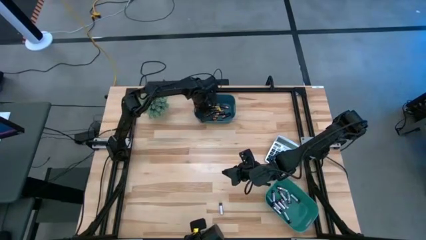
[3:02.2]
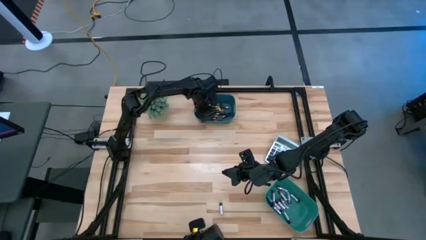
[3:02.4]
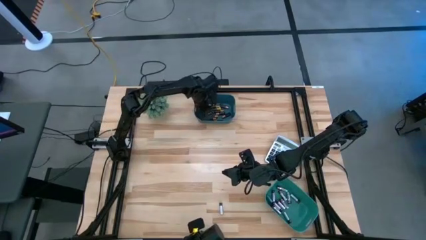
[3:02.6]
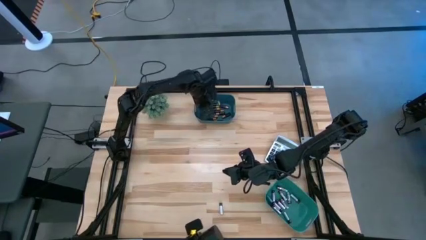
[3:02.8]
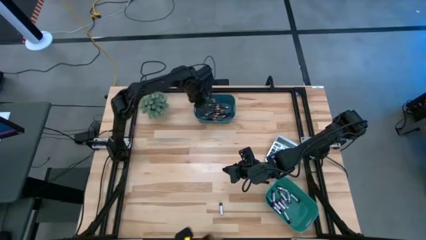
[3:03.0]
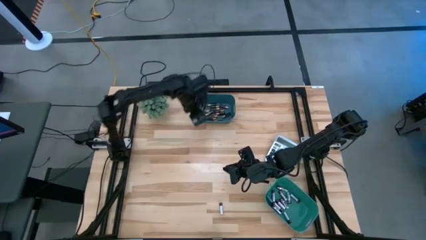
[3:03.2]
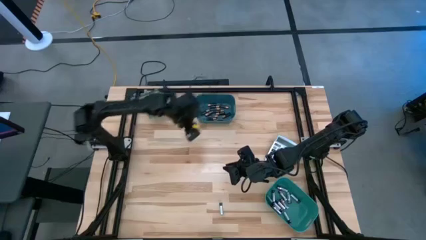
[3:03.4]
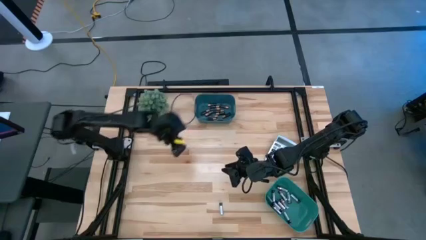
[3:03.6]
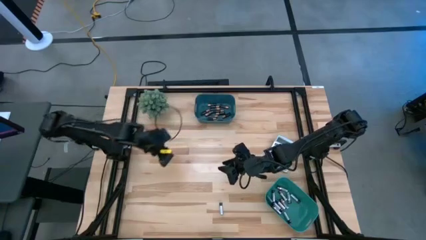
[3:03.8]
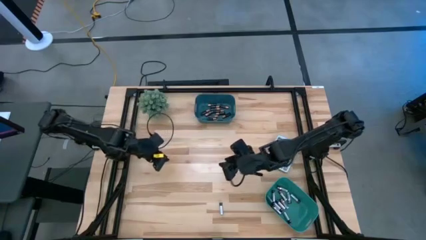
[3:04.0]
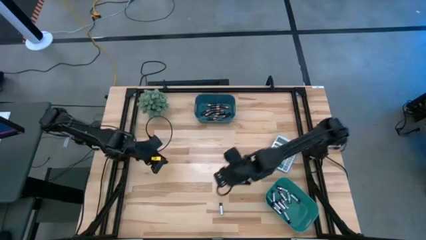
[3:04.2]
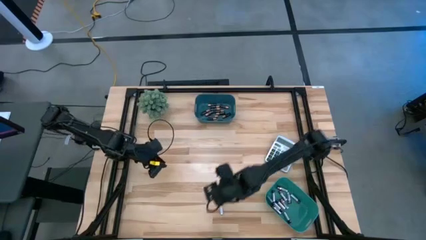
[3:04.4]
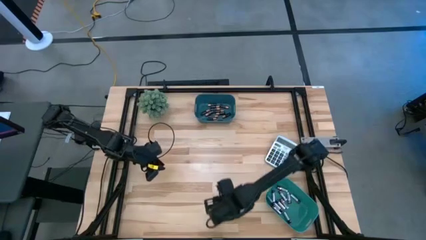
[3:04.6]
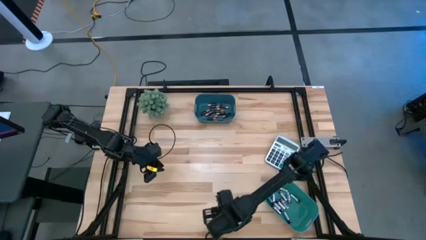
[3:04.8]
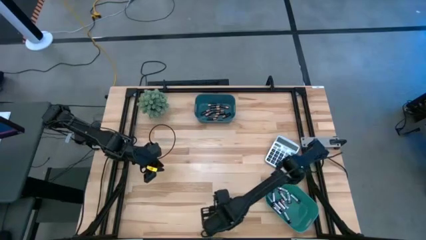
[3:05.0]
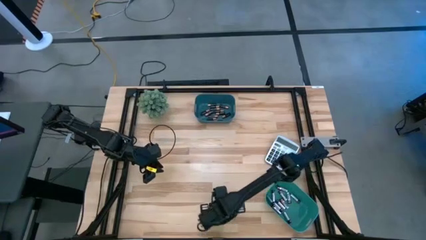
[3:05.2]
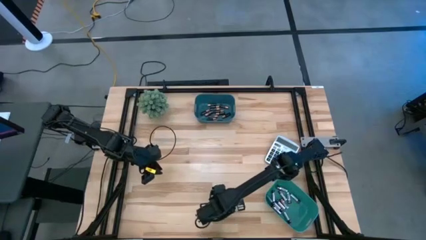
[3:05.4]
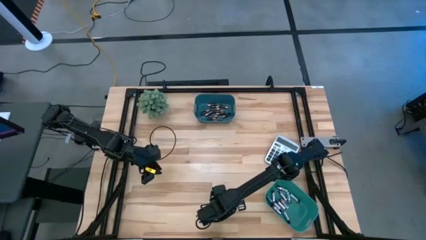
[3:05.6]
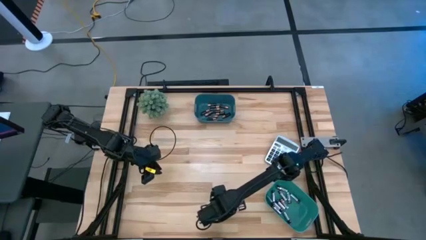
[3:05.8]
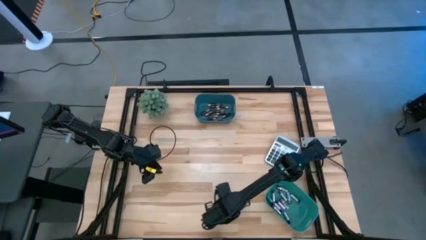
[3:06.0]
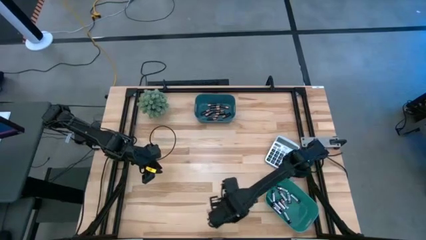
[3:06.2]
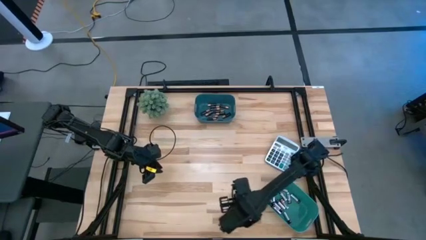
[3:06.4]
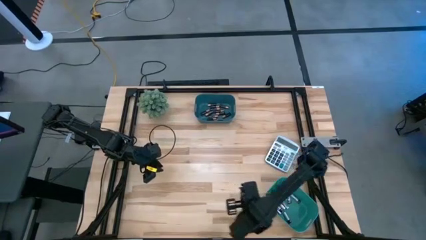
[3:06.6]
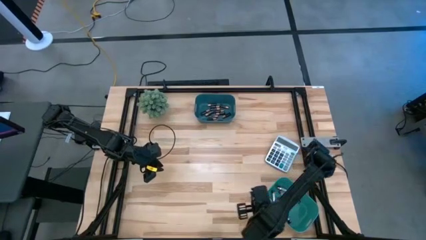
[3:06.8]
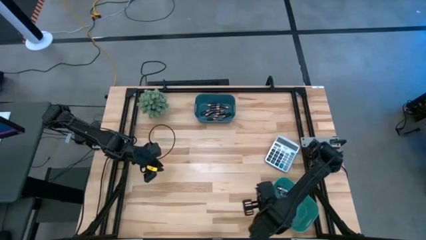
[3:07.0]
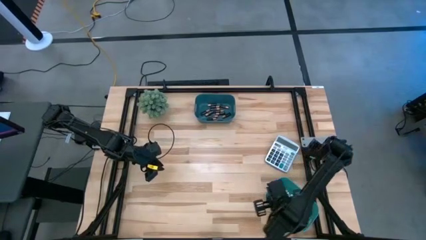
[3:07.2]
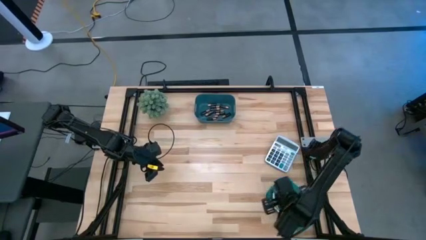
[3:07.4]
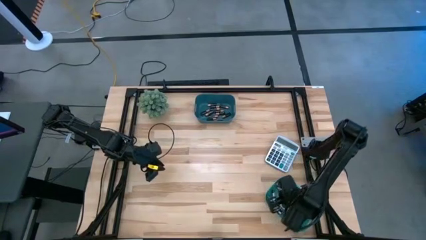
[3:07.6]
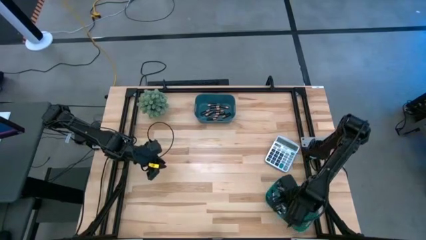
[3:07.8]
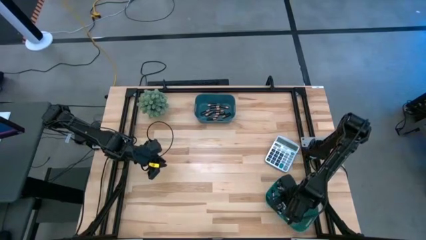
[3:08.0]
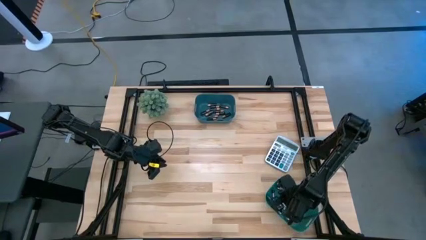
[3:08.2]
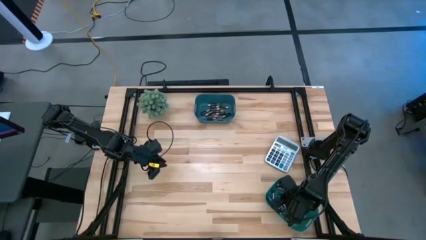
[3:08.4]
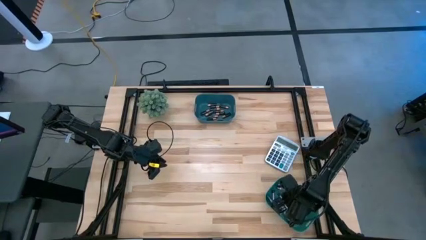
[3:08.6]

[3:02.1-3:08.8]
Task: Sort batteries
Put the silver battery into the green bin

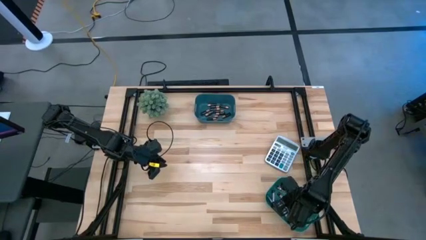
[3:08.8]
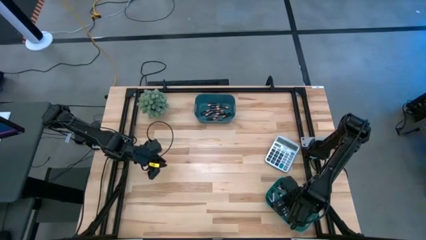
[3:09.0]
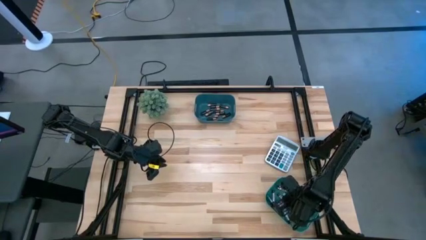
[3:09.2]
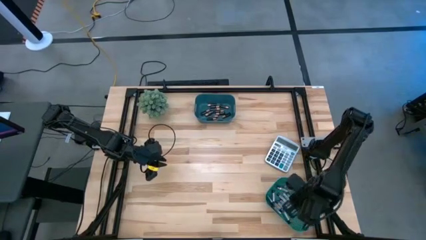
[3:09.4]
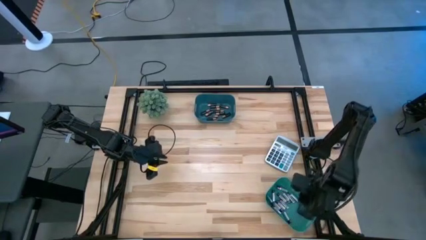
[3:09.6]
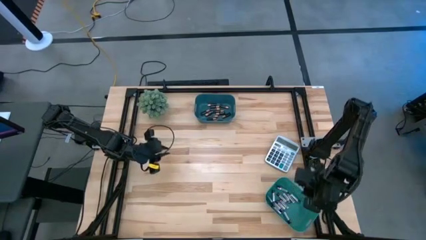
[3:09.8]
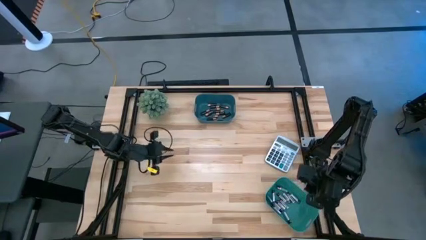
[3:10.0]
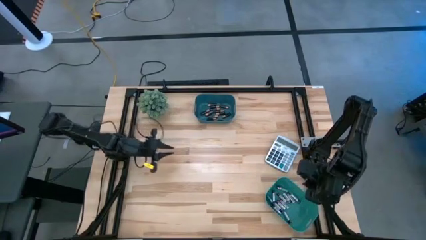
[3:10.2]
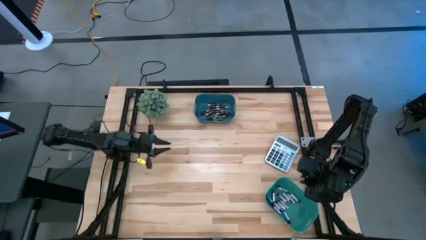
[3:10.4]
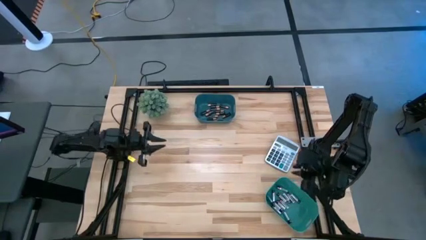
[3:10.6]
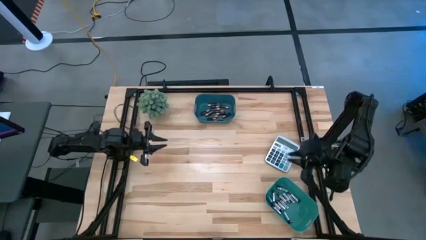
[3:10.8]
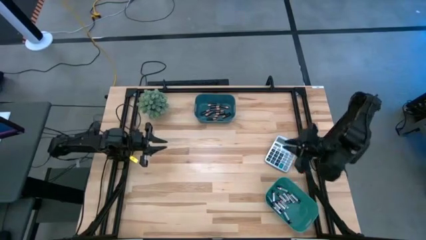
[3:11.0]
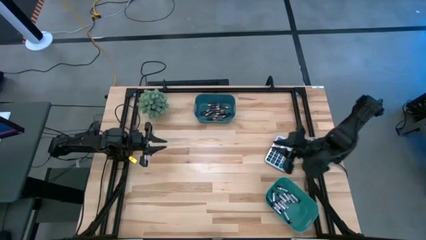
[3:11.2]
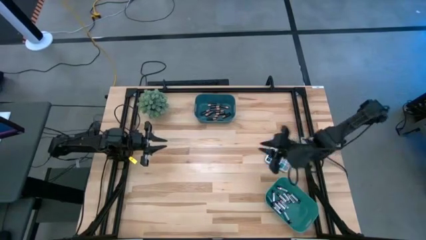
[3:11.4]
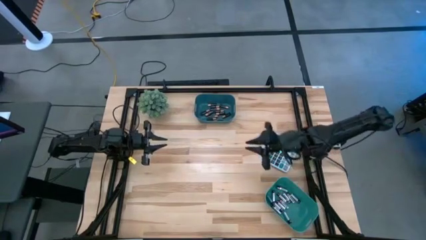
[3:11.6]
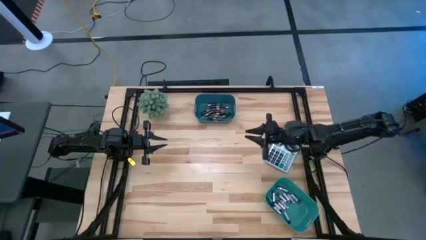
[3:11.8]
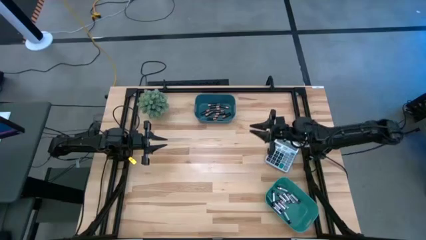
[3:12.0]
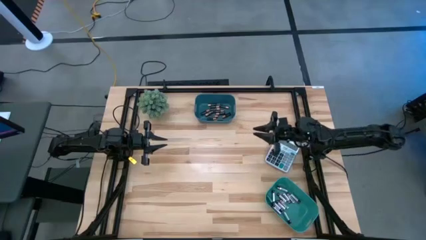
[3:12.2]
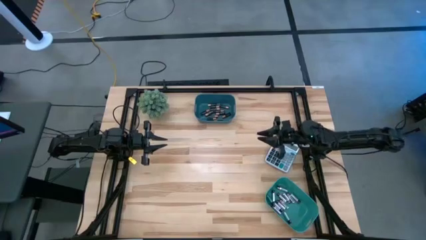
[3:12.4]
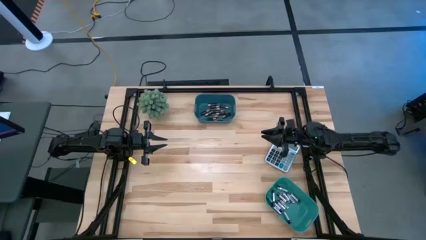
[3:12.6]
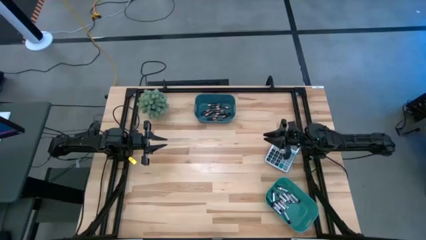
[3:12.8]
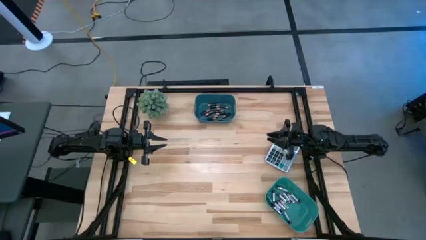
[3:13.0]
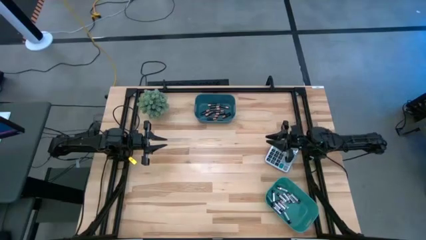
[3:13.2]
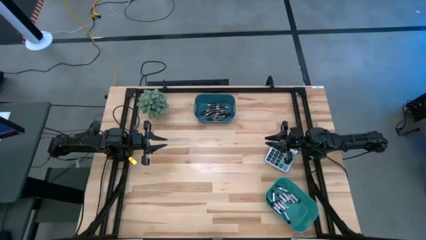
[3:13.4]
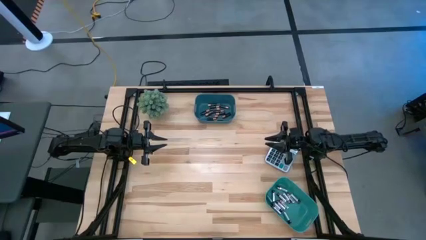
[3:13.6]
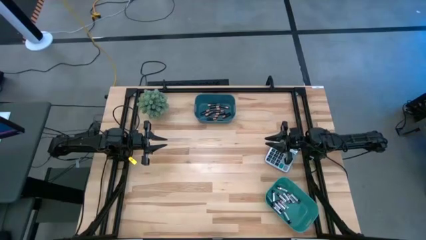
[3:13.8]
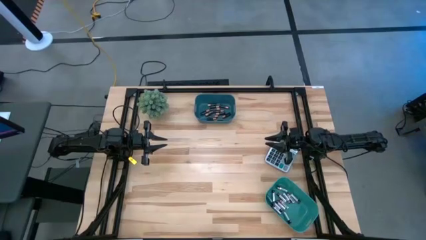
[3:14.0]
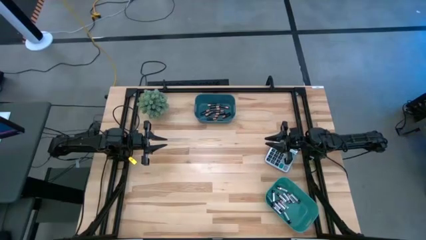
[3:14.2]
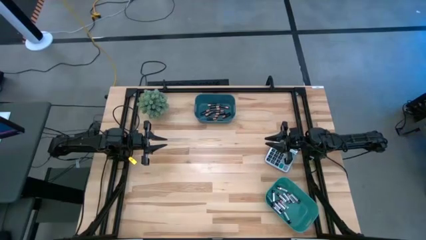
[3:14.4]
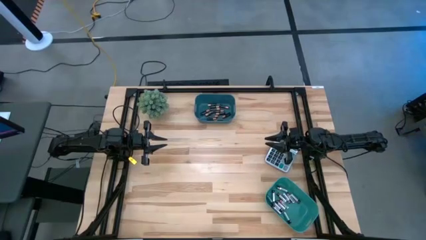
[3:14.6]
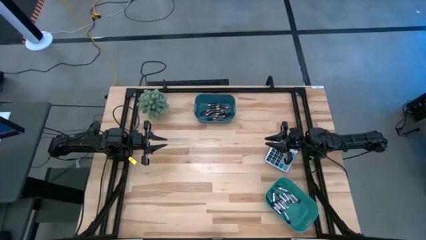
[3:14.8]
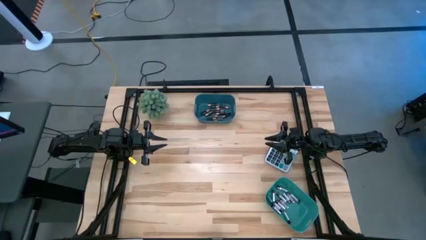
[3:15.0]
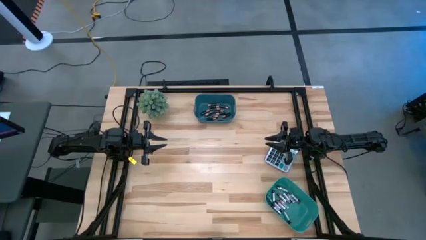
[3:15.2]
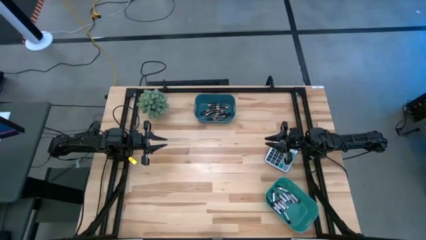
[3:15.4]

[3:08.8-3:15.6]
Return to Home Position

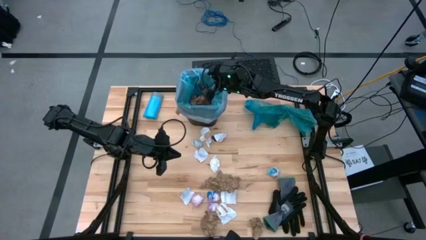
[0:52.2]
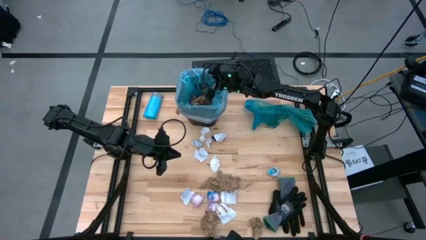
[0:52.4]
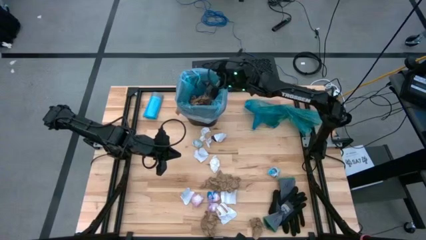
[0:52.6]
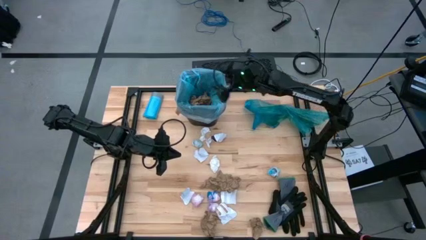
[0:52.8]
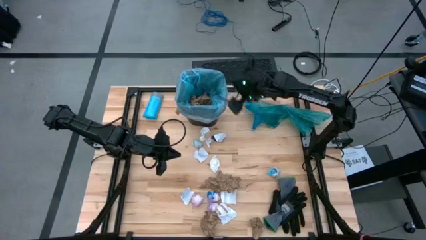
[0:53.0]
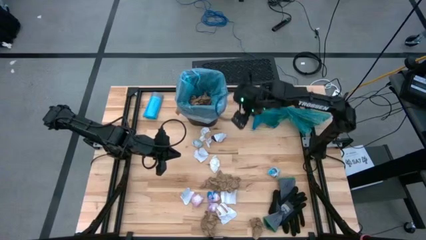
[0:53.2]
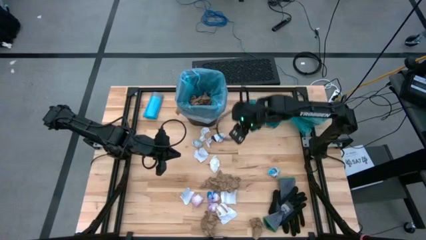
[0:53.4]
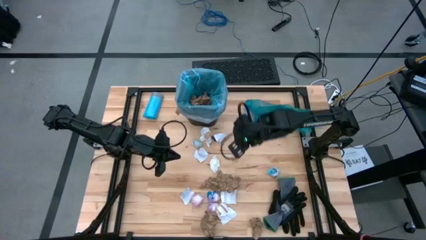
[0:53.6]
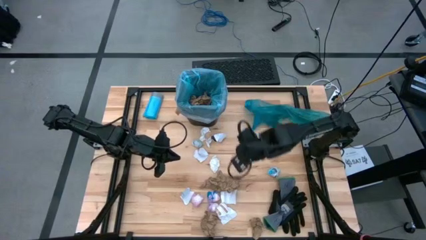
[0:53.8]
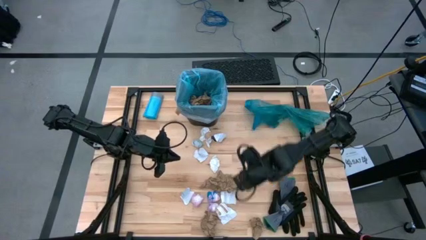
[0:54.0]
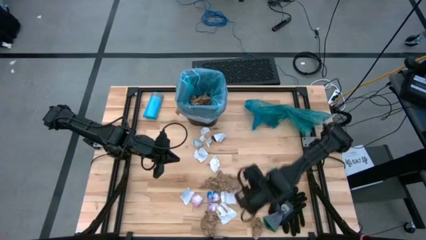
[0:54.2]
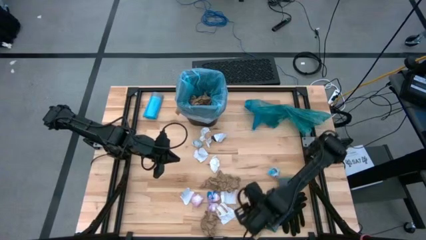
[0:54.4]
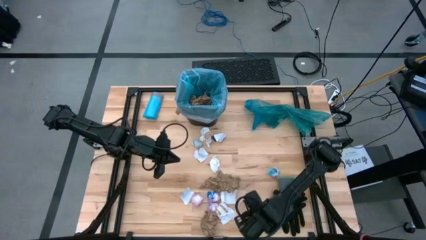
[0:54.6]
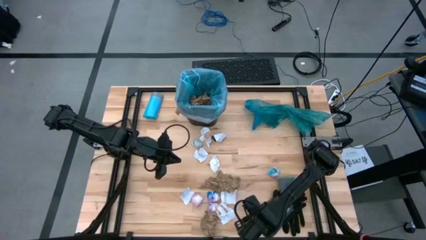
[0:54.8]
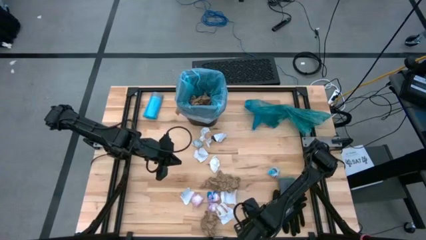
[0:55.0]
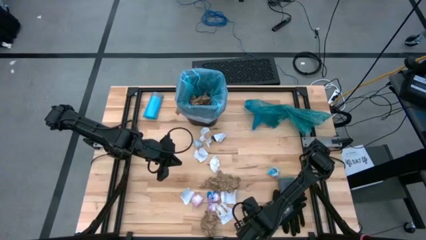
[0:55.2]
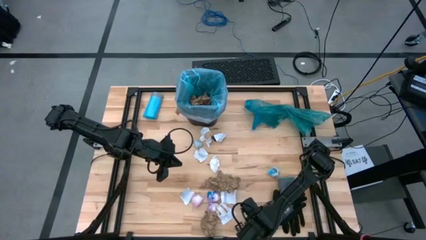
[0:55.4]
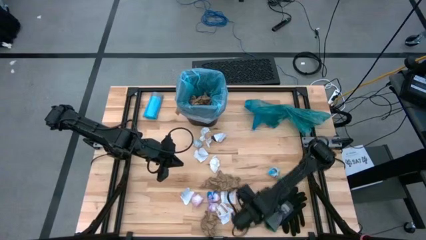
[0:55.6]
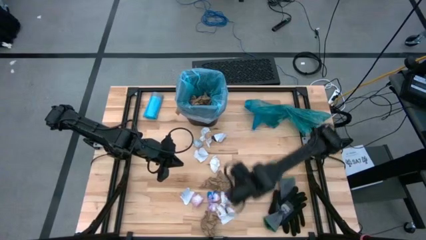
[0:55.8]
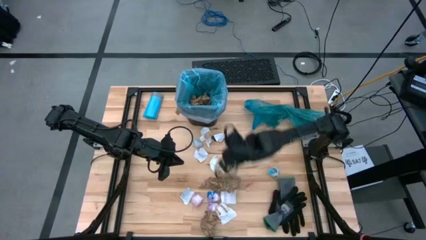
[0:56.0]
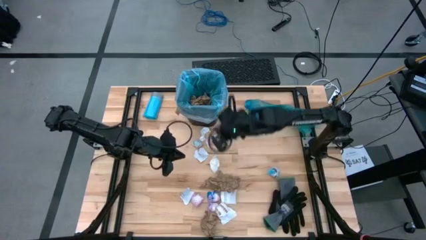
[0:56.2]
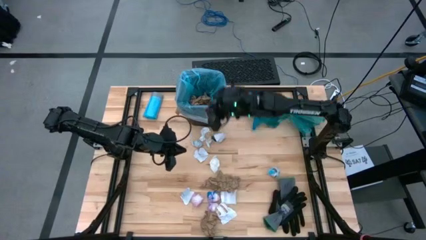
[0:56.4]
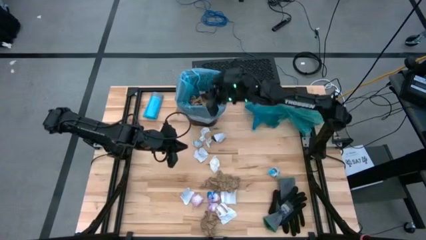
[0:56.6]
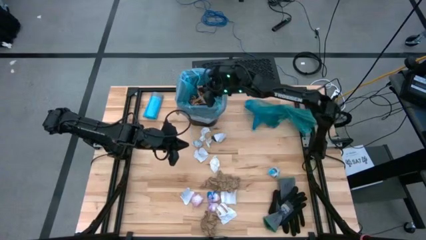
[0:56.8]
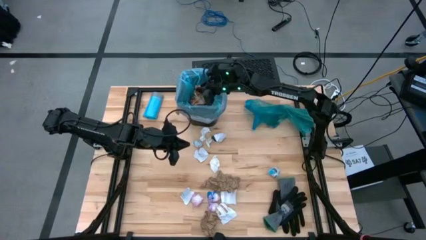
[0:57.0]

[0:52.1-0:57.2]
Task: place trash/remove bag and relplace
Put the brown paper trash into the trash bin
